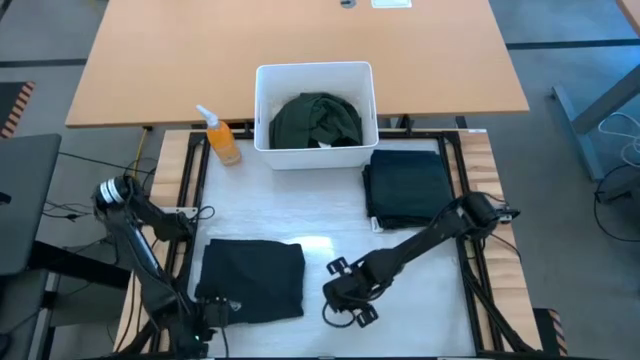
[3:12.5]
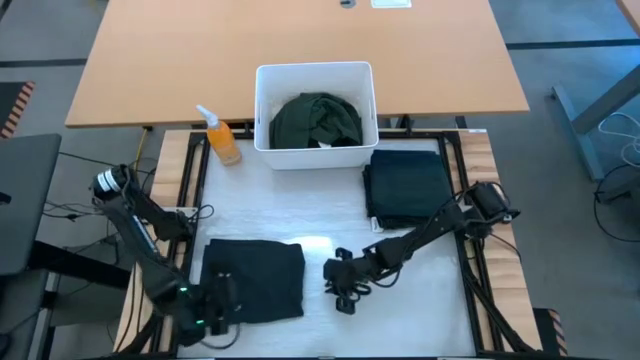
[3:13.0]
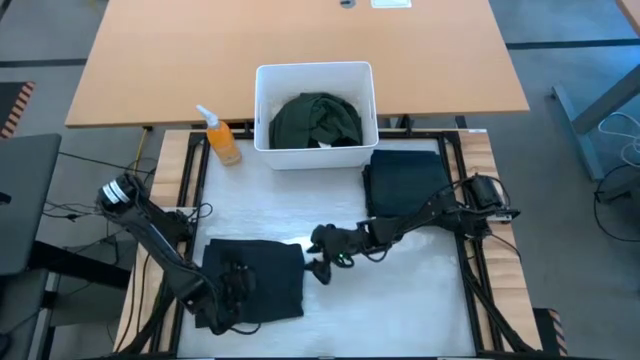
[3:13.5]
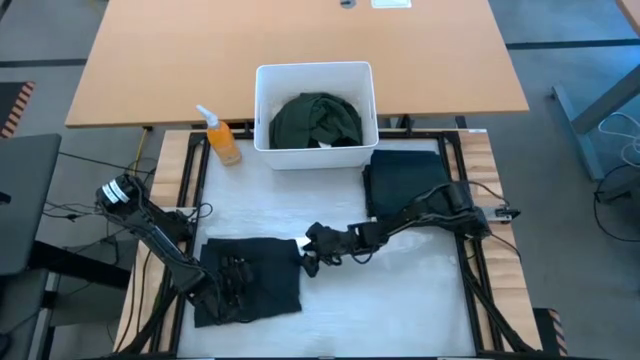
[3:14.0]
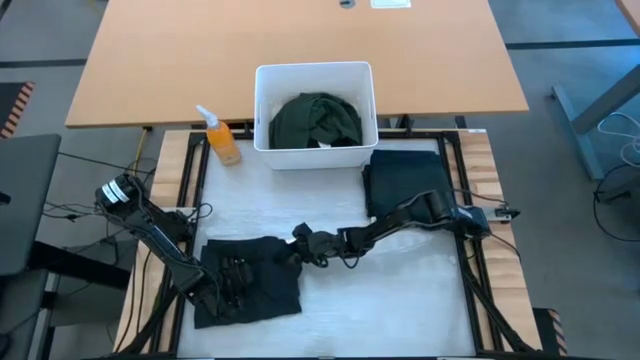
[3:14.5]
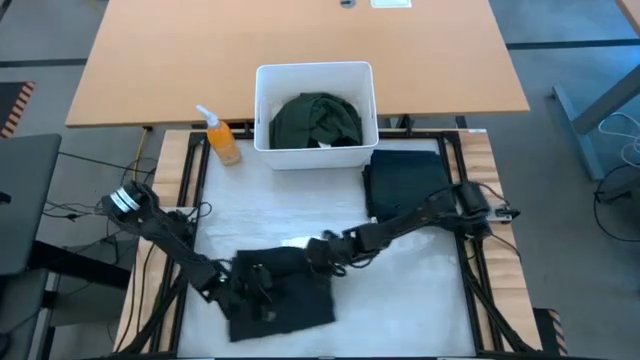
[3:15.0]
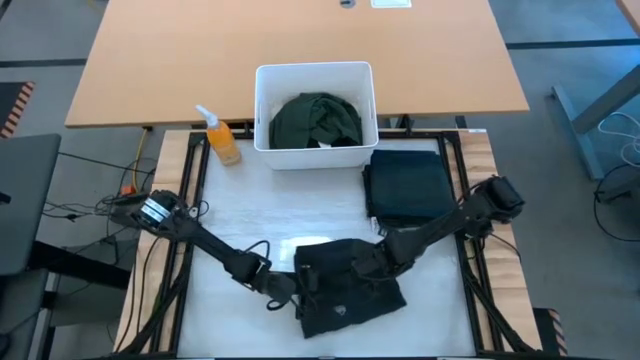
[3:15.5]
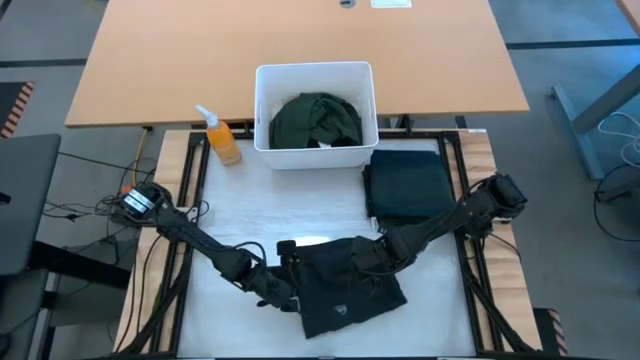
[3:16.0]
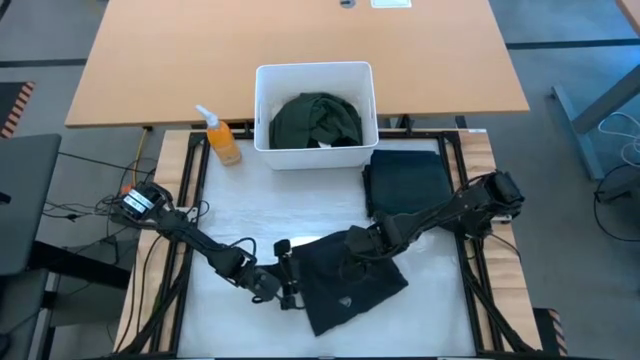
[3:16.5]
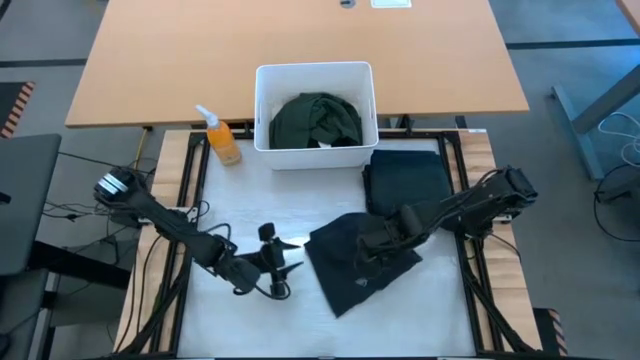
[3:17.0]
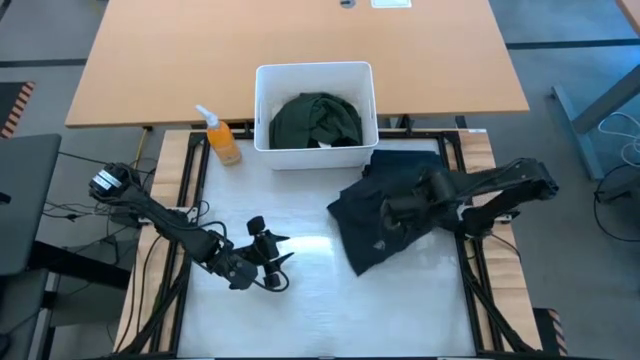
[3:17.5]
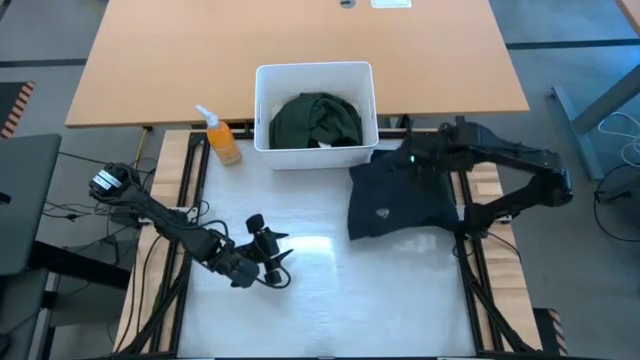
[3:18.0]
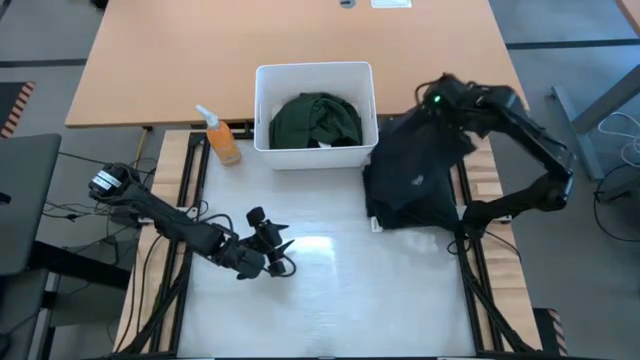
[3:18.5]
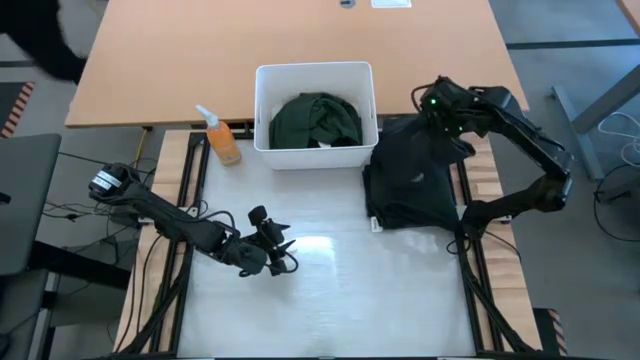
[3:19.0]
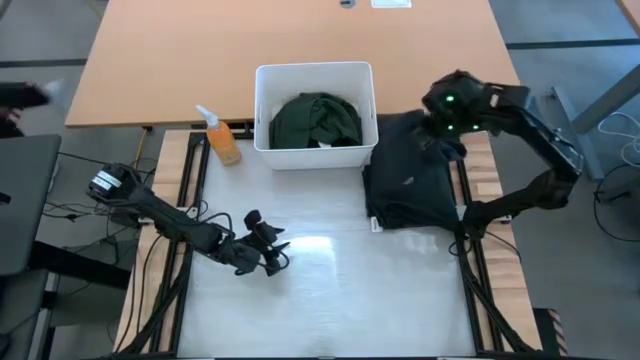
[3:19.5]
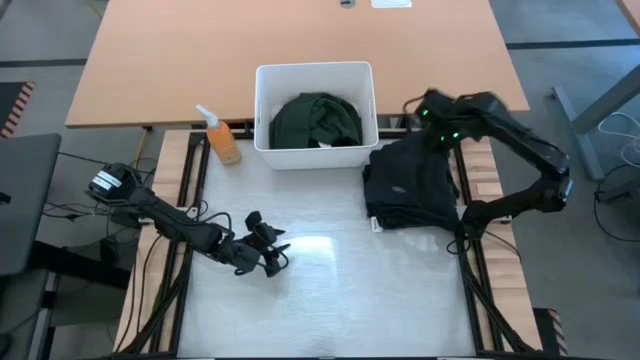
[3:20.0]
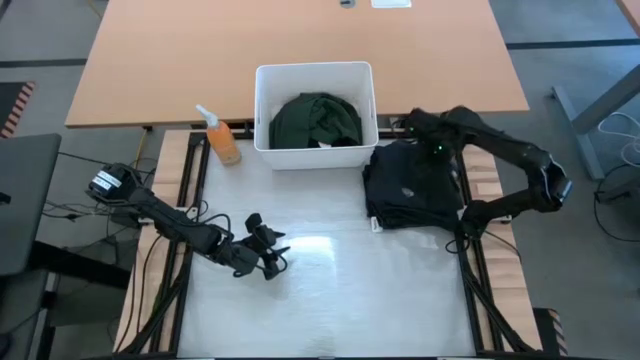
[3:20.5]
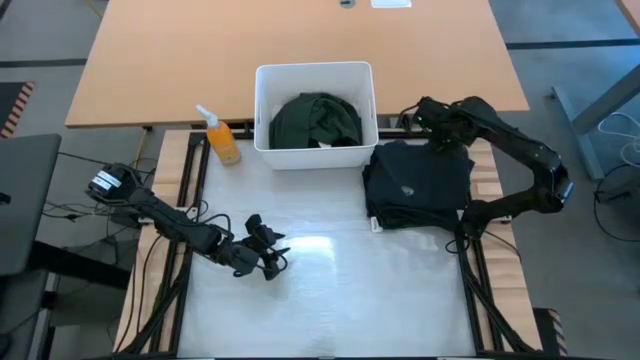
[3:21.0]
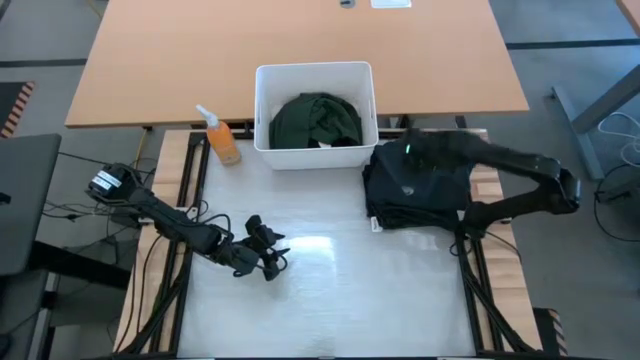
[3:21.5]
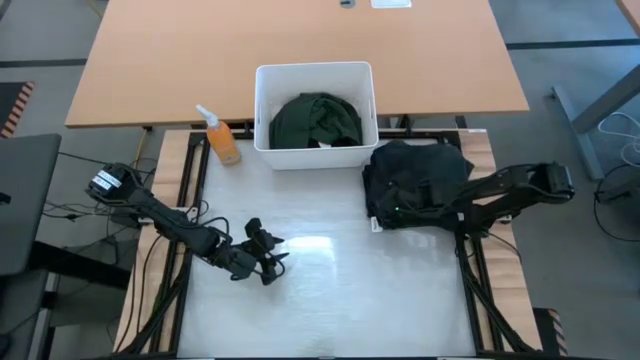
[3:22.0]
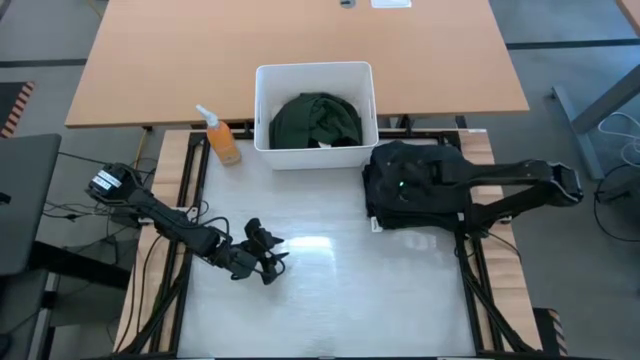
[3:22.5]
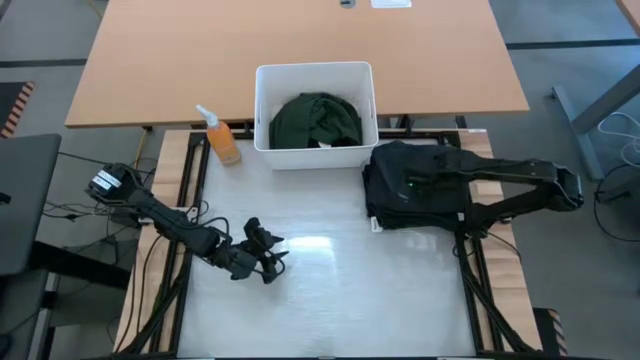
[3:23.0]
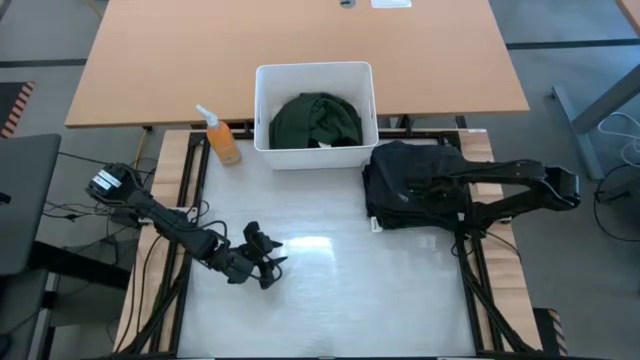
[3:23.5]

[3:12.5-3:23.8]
Task: Fold laundry
Stack the folded black shorts on top of the folded dark blue jeans

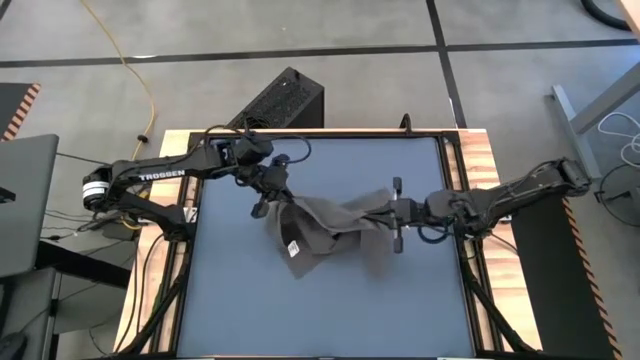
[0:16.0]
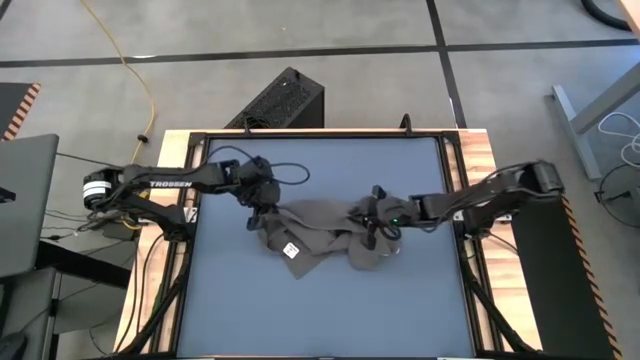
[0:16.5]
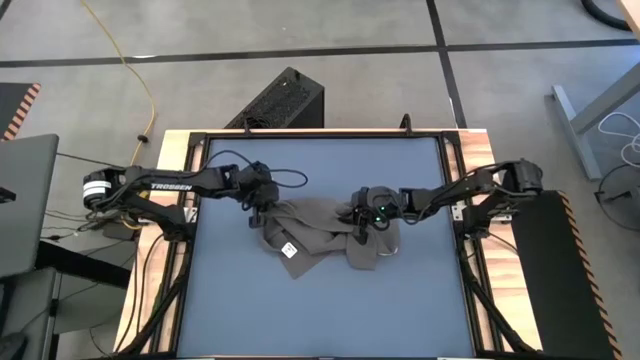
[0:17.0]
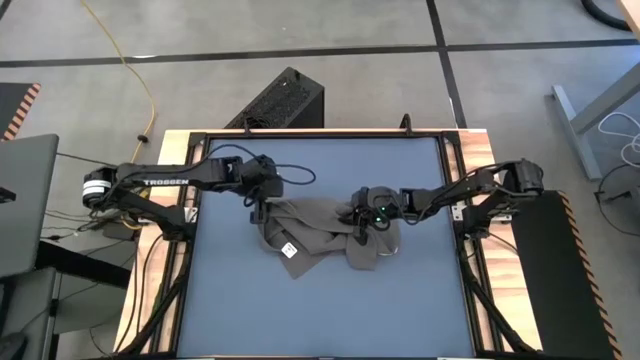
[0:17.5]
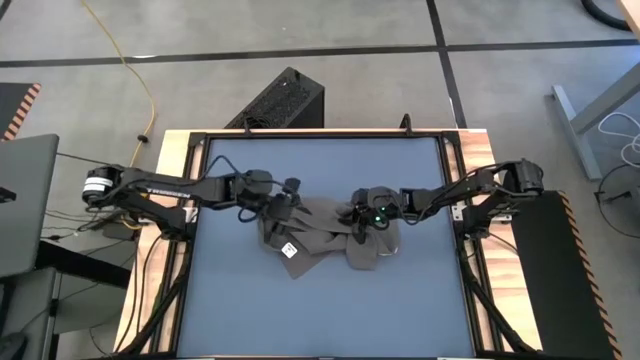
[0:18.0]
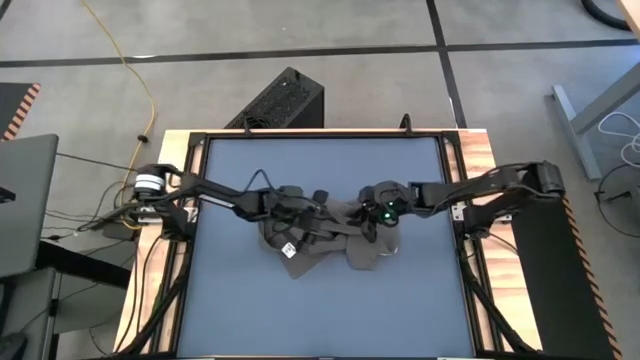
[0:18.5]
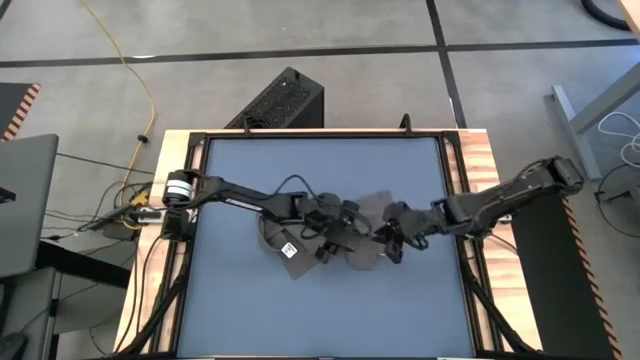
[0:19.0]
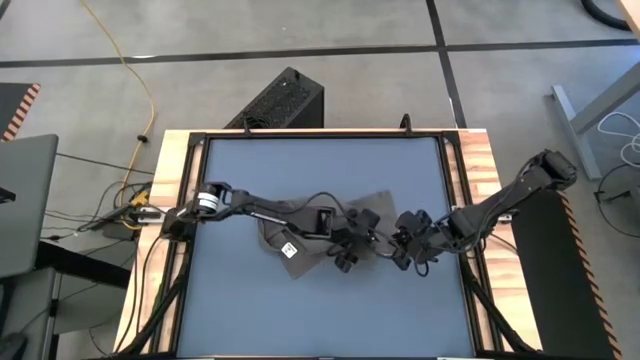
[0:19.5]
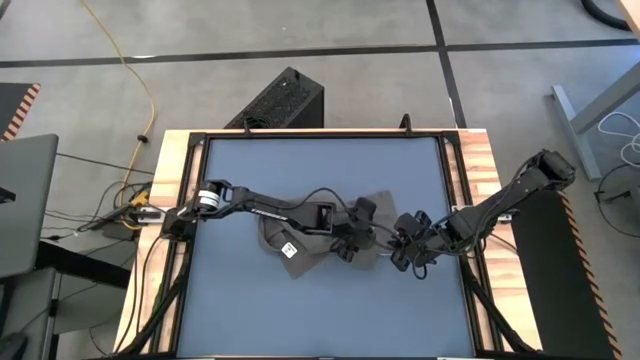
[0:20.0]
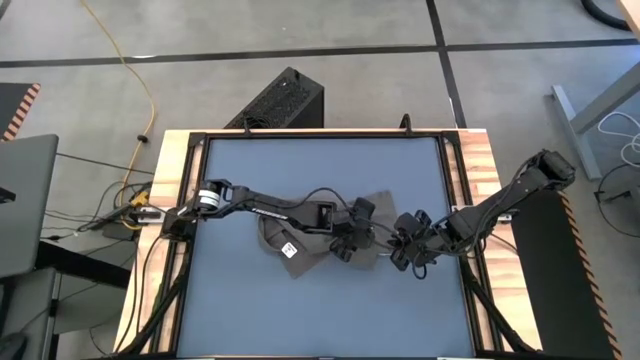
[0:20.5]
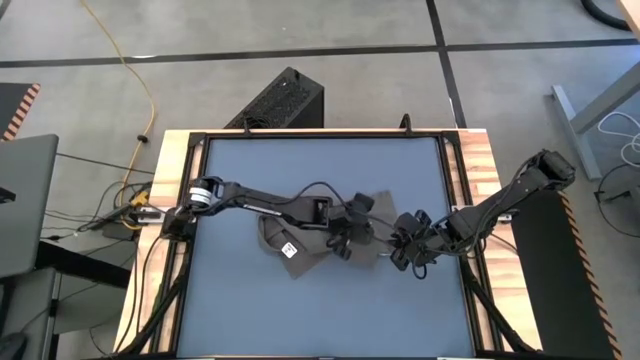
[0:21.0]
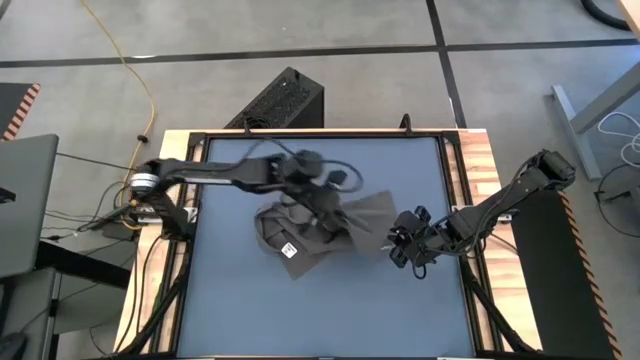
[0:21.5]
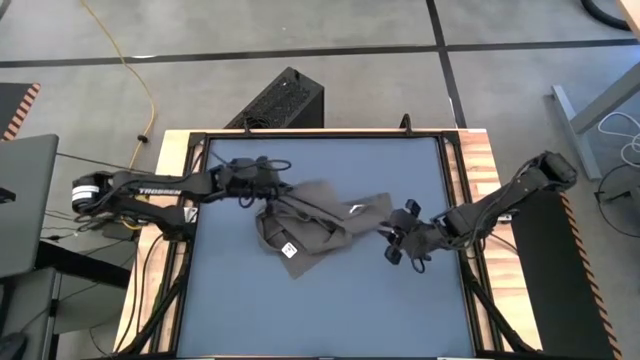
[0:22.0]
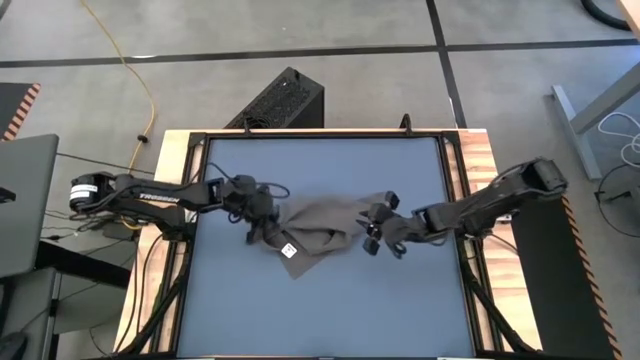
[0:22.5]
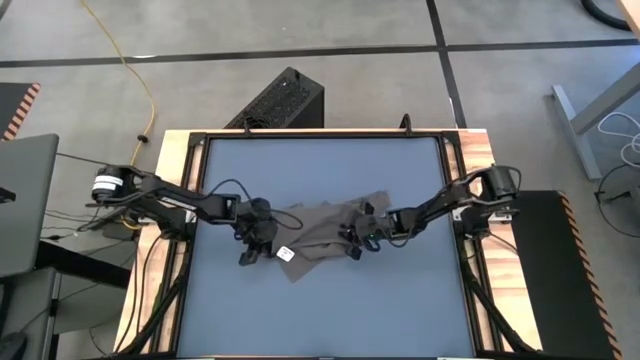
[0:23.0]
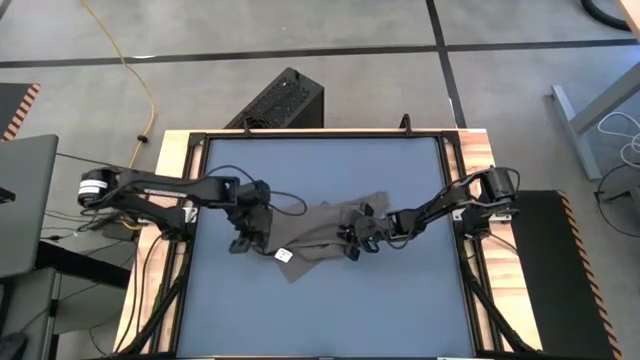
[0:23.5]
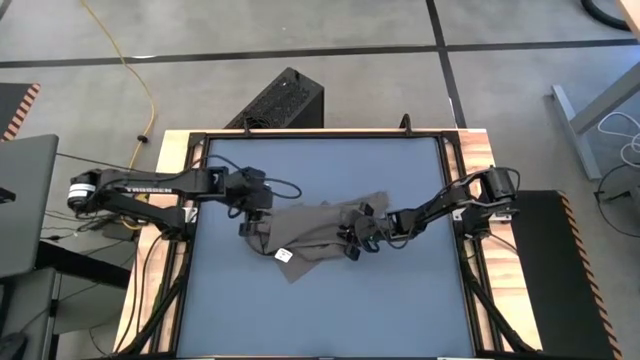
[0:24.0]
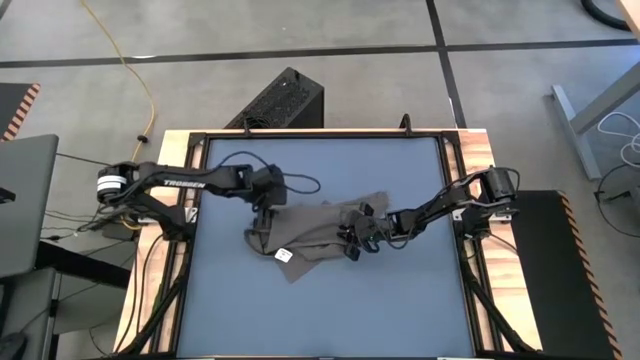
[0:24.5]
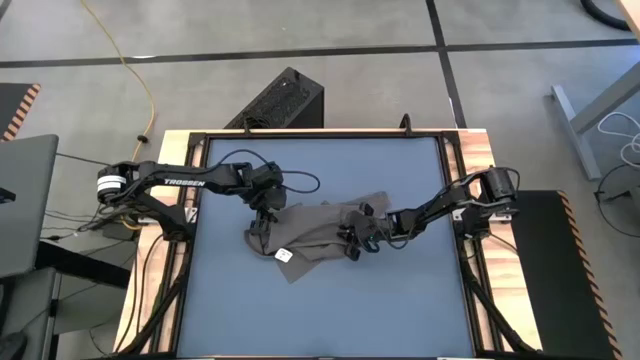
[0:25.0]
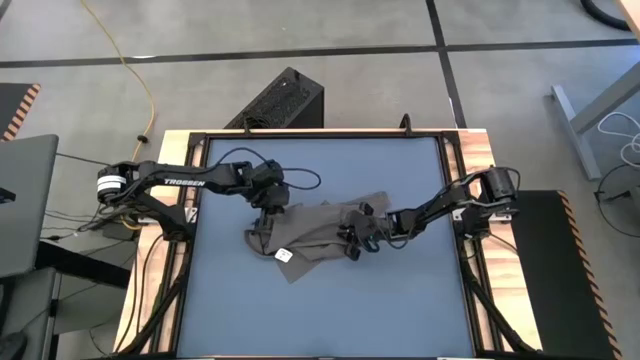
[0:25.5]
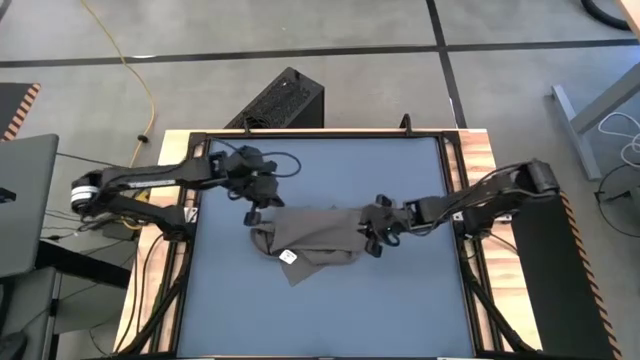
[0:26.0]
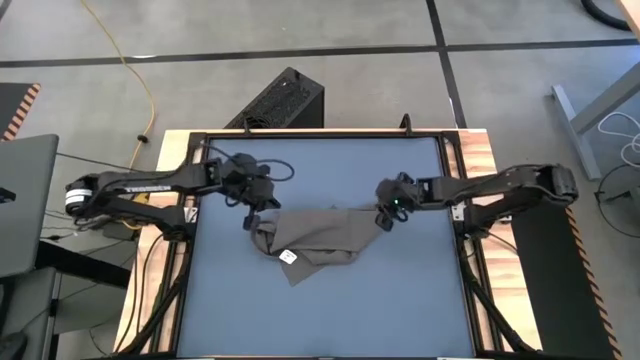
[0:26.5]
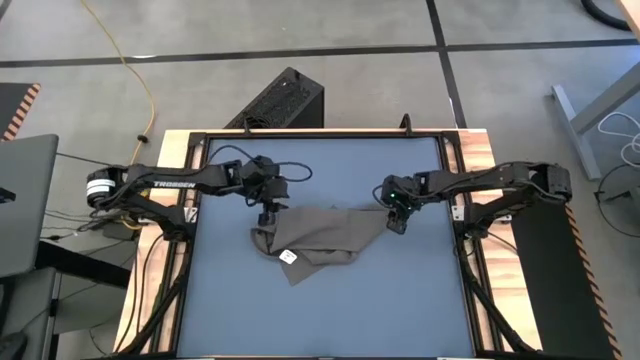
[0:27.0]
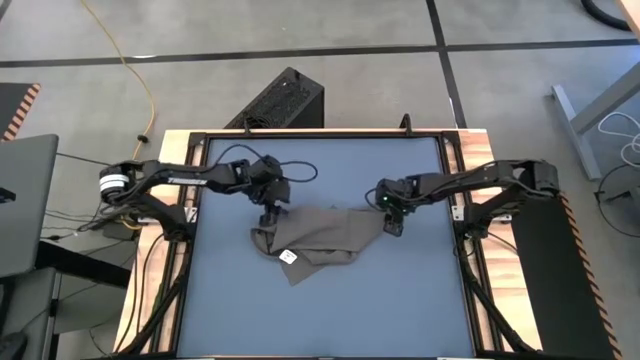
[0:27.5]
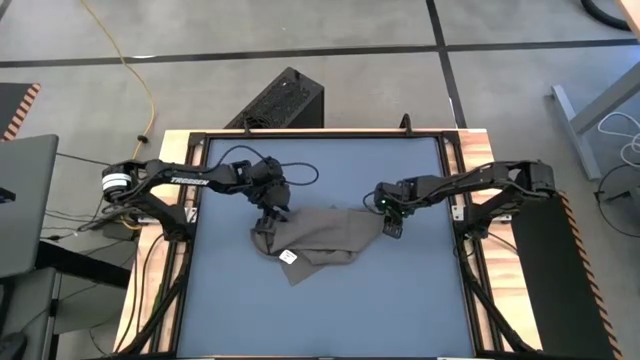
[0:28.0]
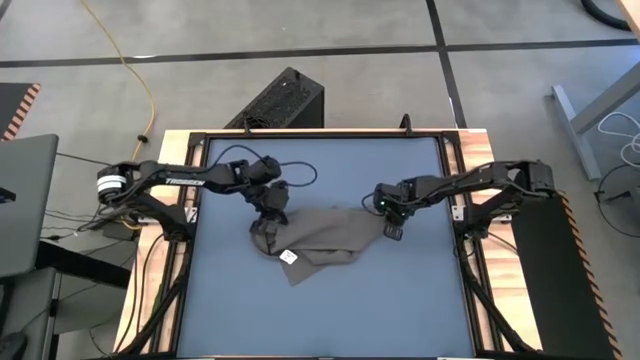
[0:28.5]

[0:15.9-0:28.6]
Task: Roll towel into tight, uniform cylinder
Fold the gray towel
